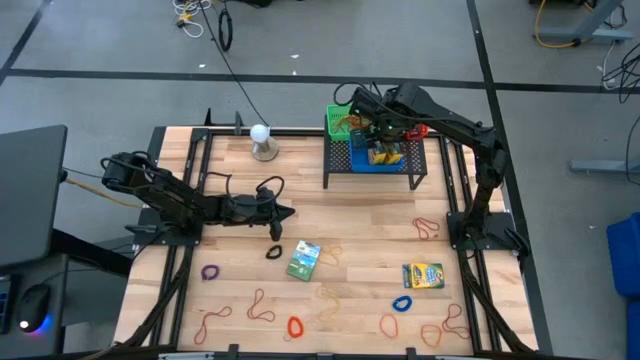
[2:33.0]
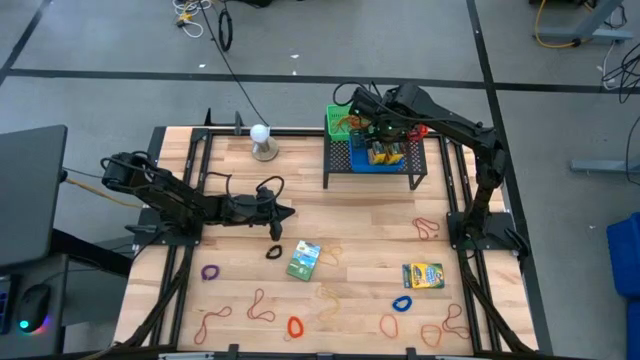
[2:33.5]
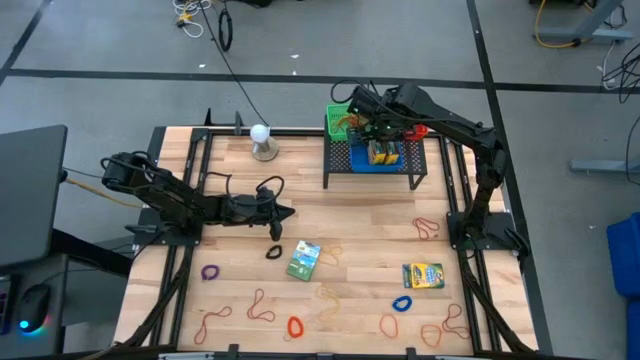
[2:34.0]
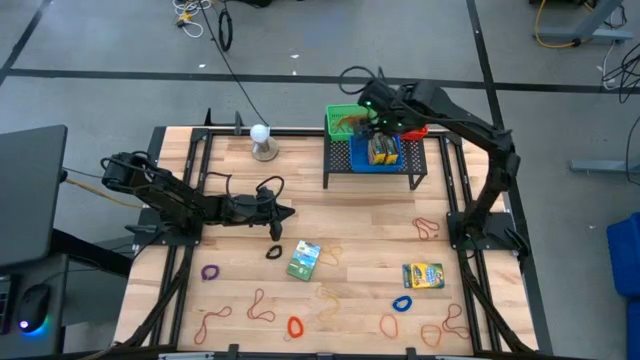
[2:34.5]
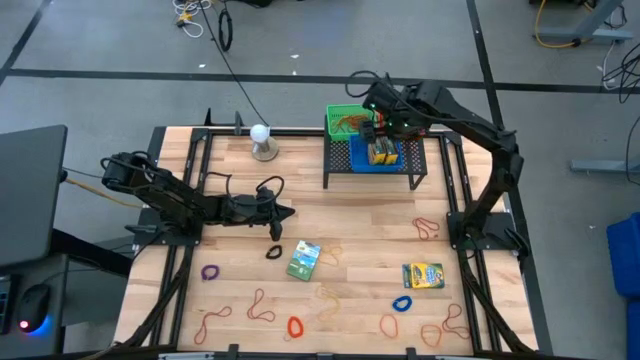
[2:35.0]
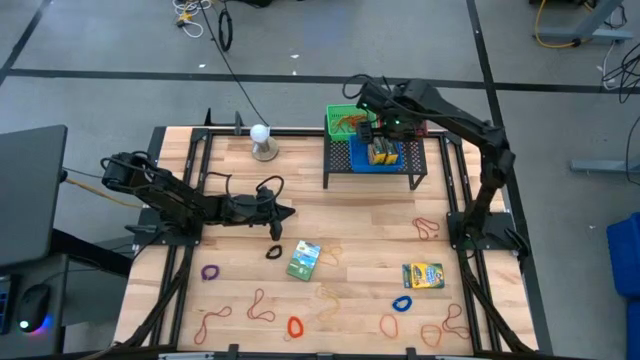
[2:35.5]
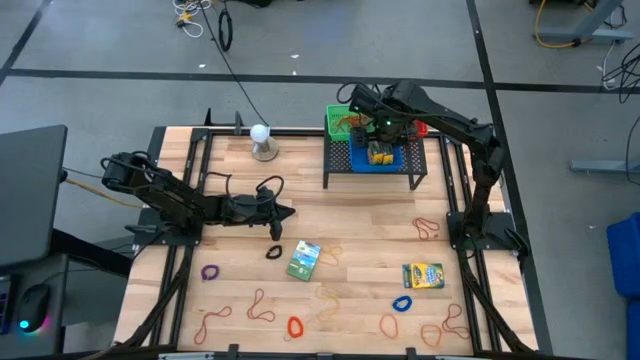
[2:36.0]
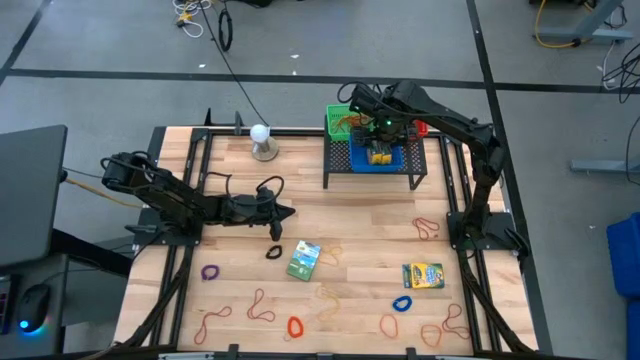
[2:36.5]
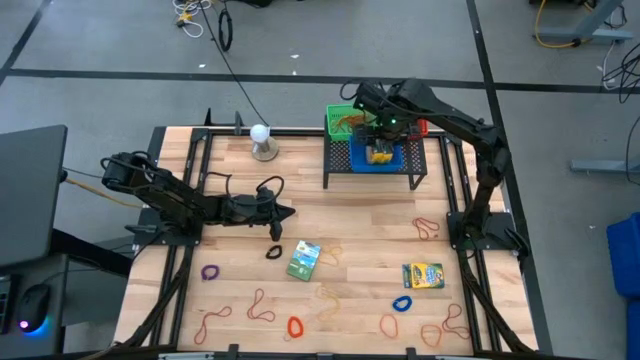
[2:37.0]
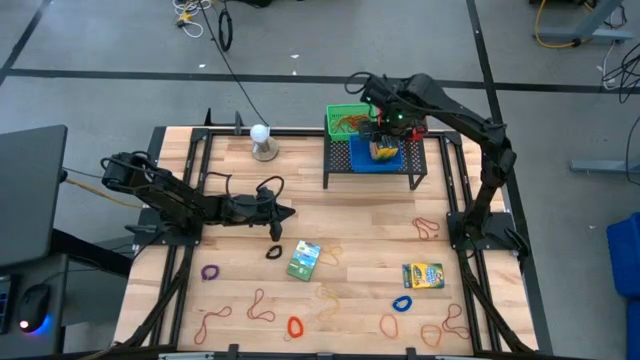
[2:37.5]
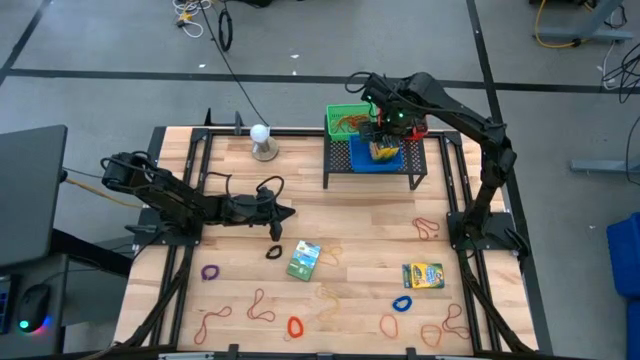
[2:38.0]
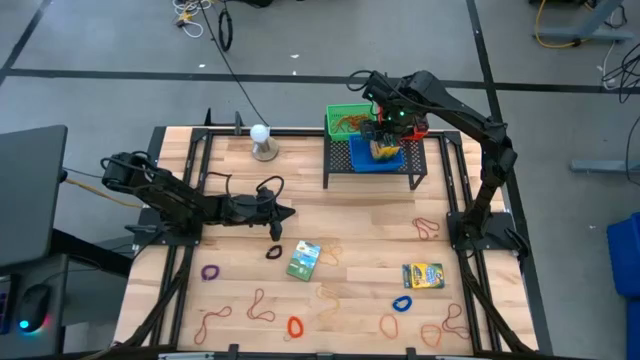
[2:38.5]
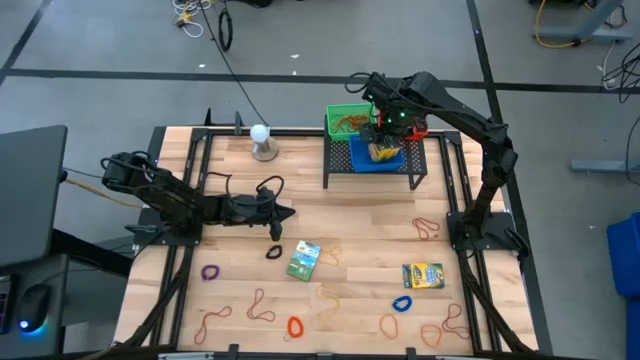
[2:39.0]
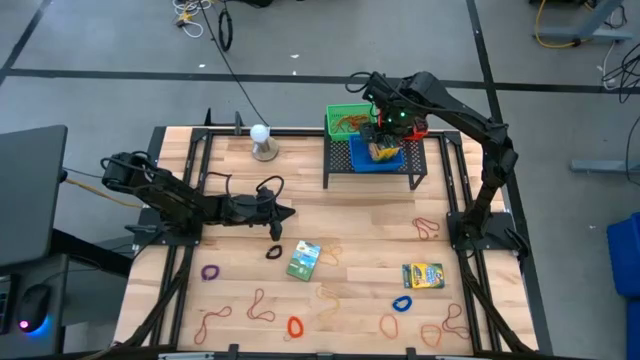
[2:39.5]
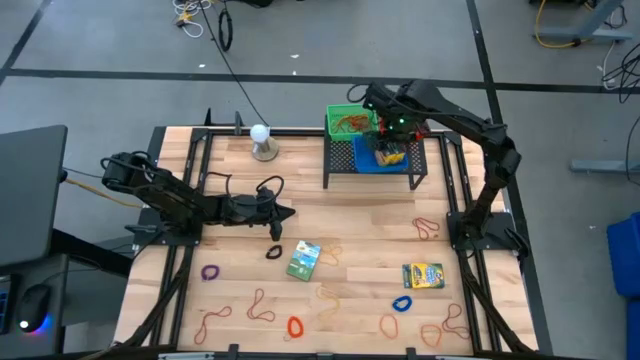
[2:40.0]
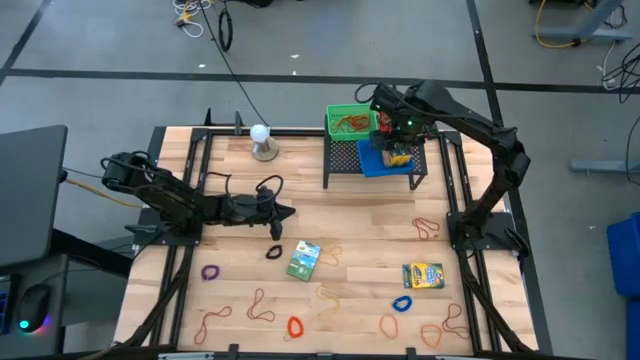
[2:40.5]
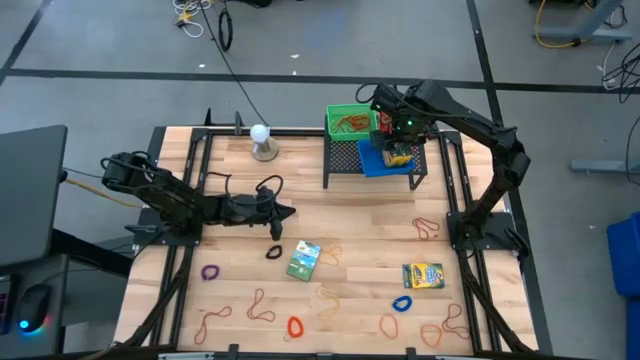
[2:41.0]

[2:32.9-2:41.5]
Task: Pick & Place Office Desk Supplies
Adjust the yellow crayon boxes in the blue bin

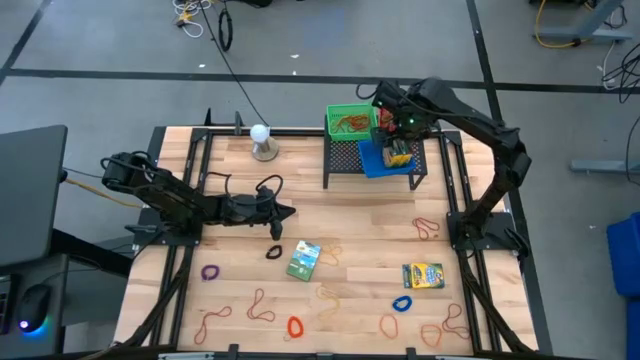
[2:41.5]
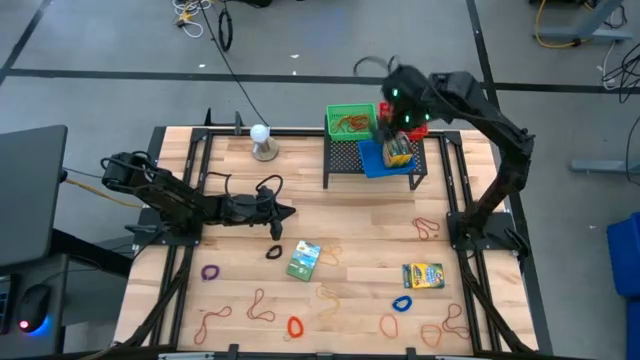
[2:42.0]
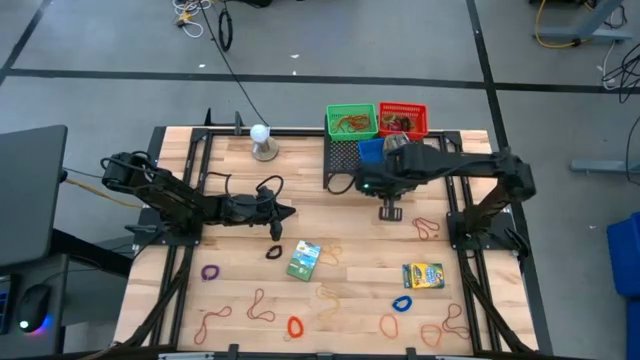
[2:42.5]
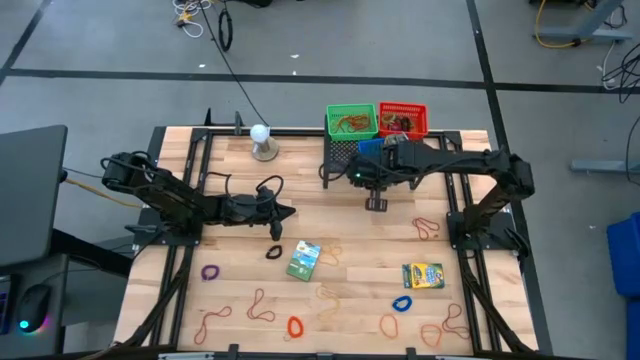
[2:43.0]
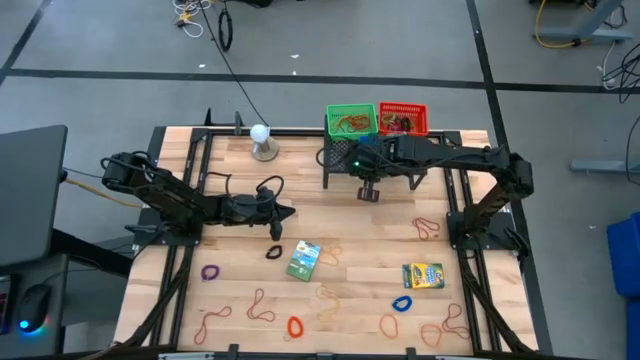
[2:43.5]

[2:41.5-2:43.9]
Adjust the blue bin on the black shelf

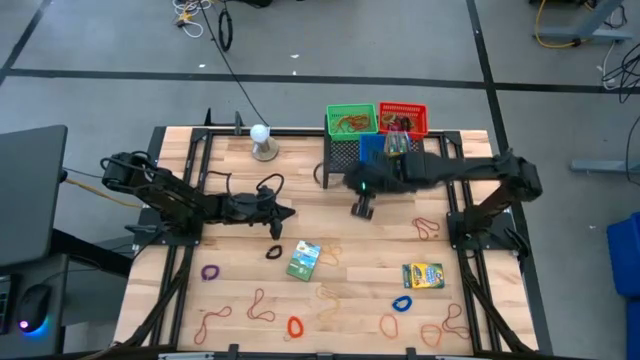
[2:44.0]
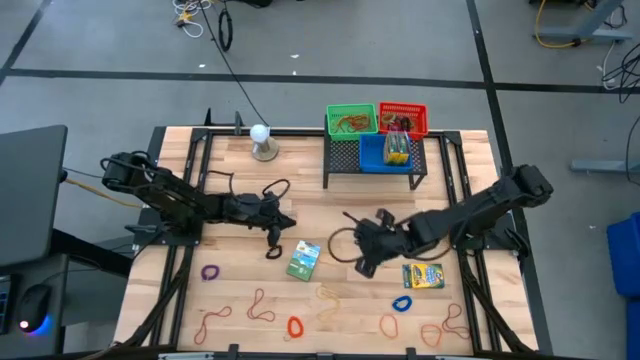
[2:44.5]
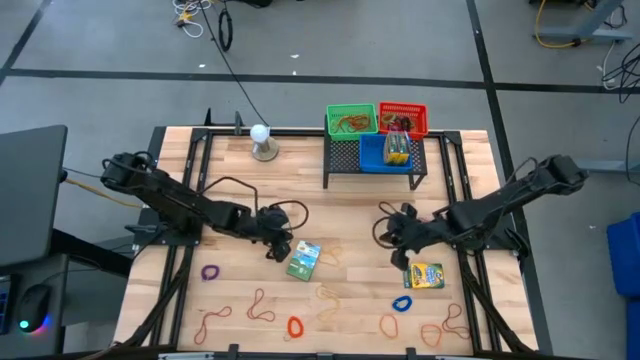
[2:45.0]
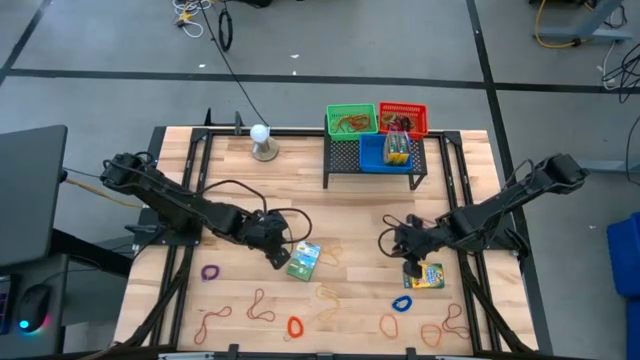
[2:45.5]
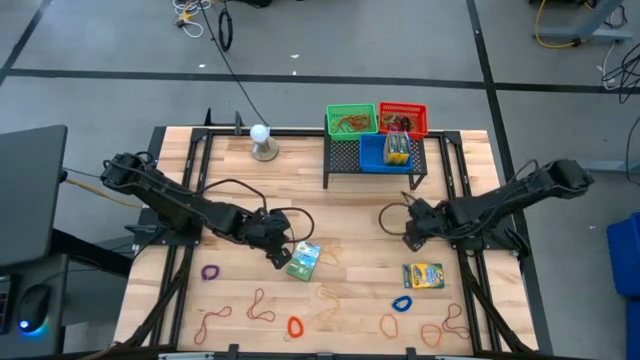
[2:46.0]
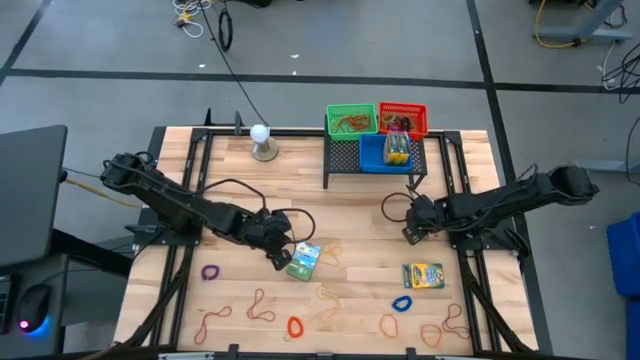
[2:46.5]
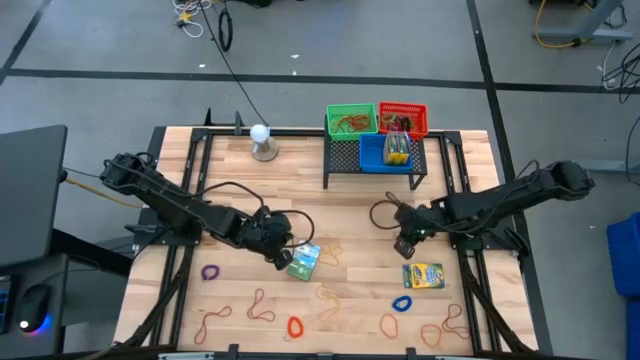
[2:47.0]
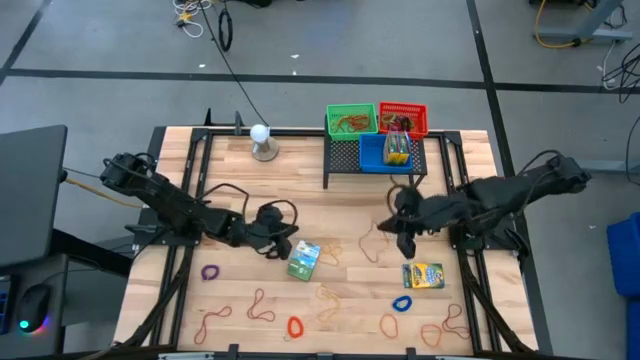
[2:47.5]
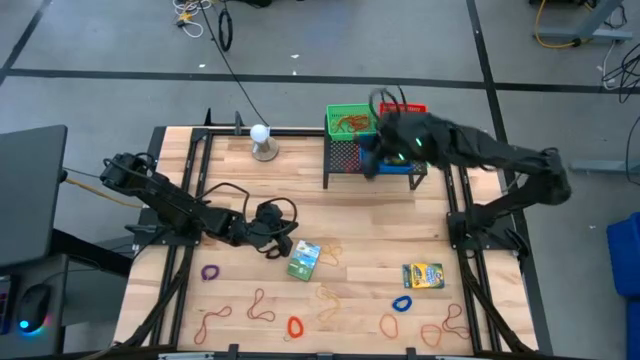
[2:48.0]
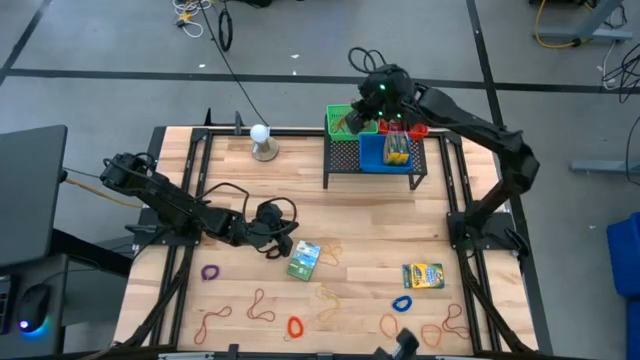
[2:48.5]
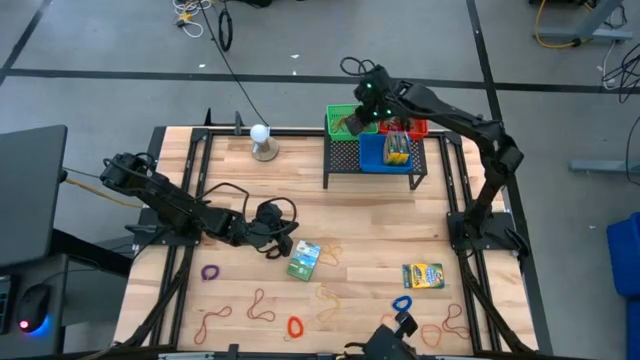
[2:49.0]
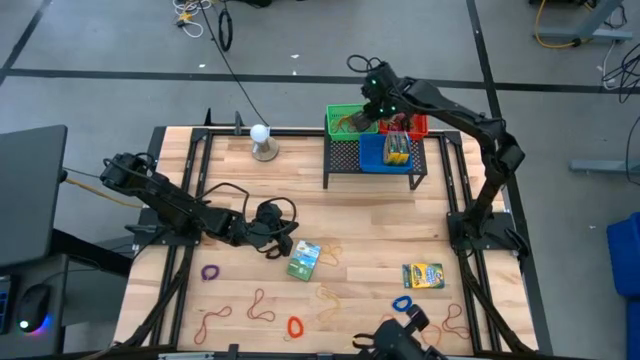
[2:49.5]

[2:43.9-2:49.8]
Put the red rubber band into the green bin

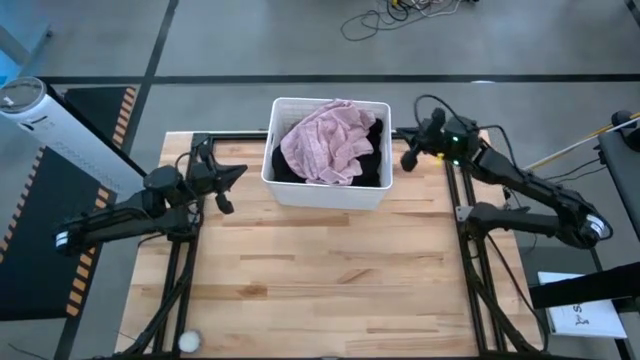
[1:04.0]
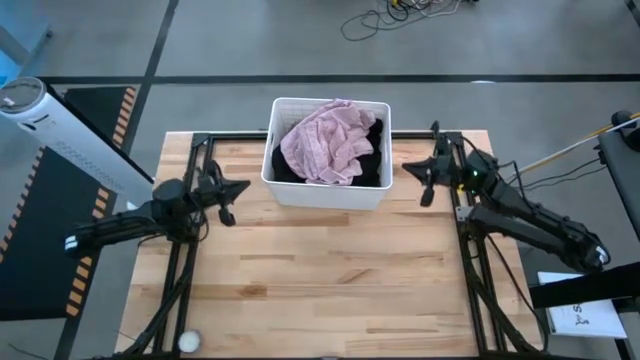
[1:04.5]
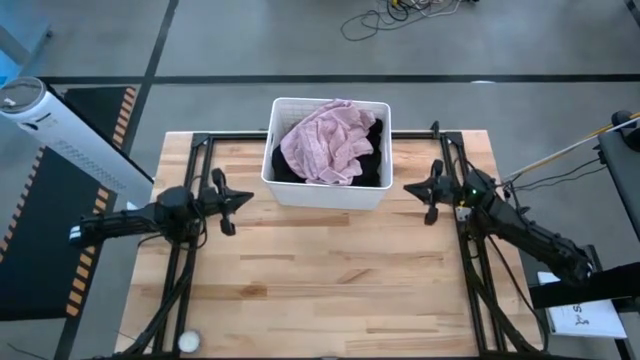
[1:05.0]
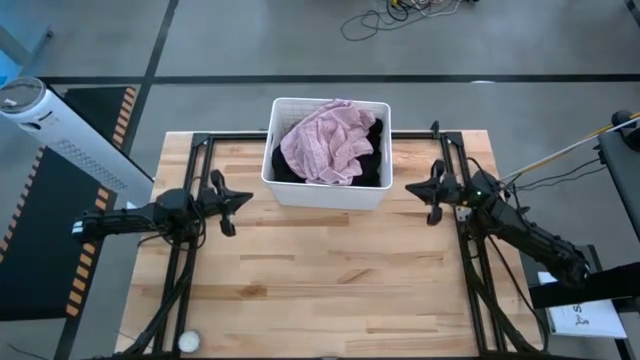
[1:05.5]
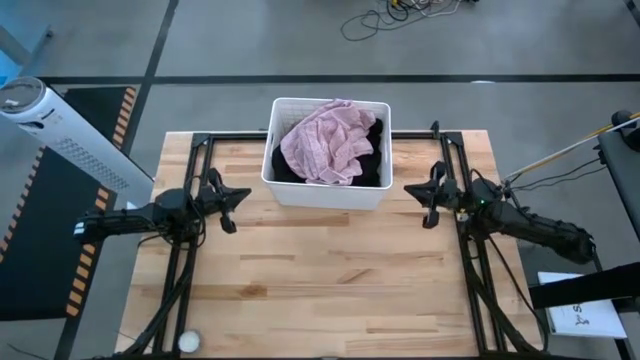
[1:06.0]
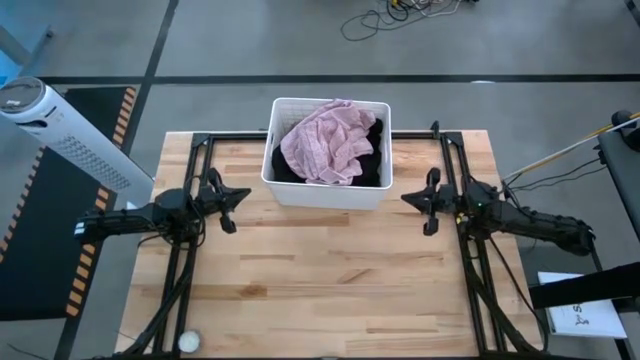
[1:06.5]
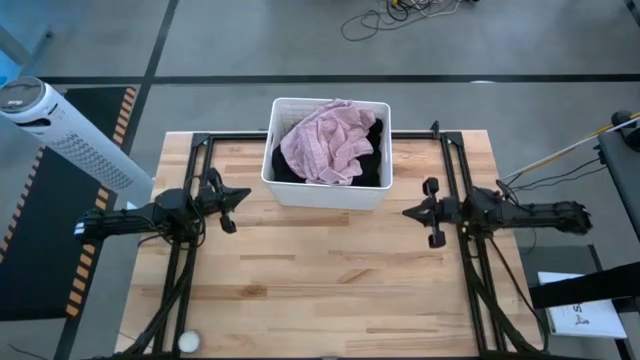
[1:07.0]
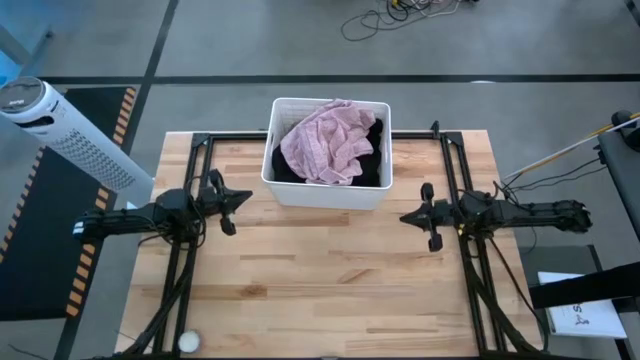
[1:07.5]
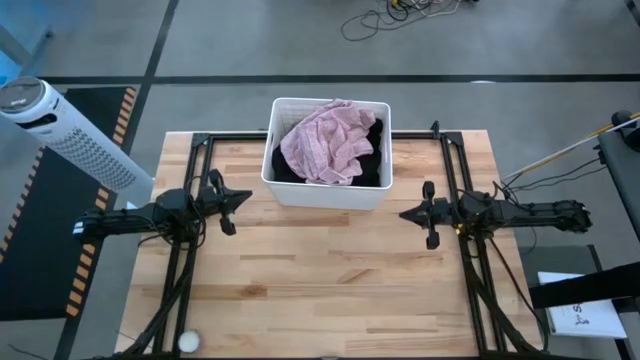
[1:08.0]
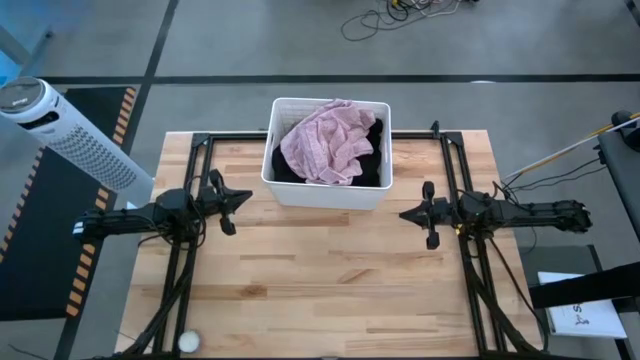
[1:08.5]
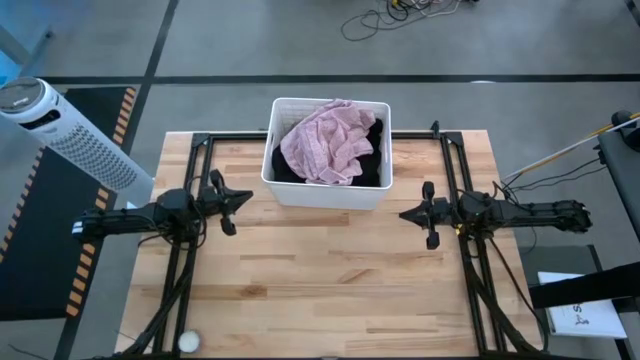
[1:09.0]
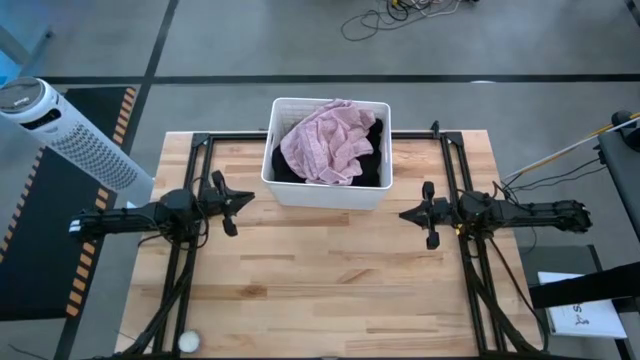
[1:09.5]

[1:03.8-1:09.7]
Task: Sort clothes
Return to Home Position
